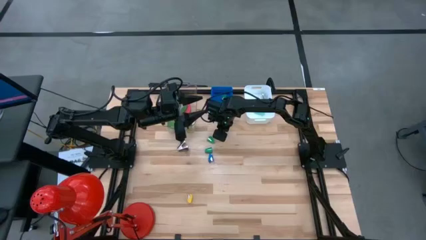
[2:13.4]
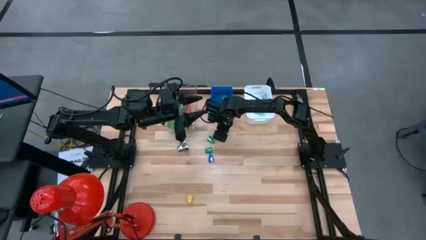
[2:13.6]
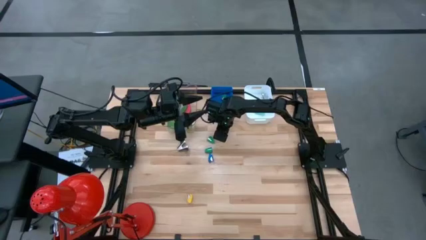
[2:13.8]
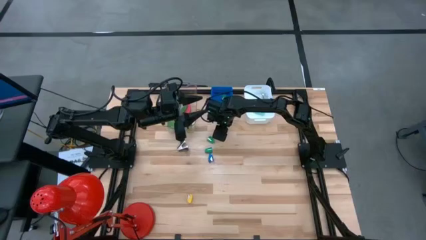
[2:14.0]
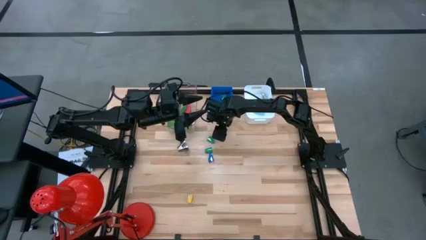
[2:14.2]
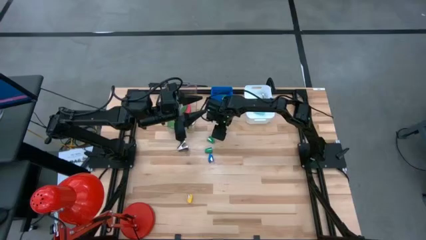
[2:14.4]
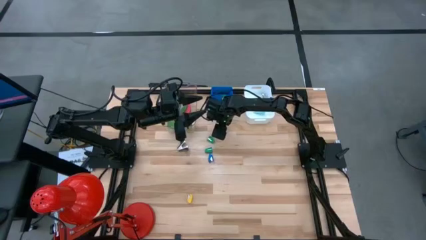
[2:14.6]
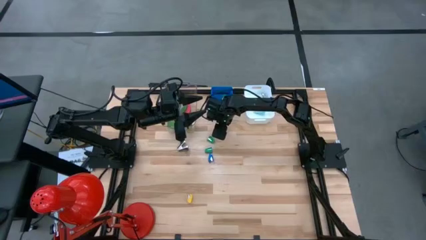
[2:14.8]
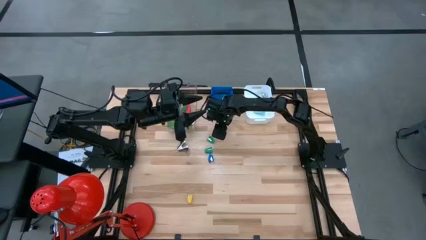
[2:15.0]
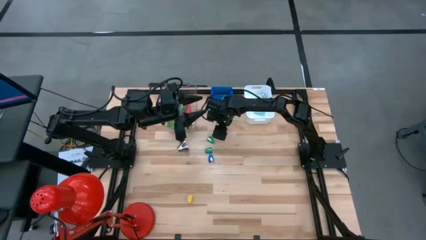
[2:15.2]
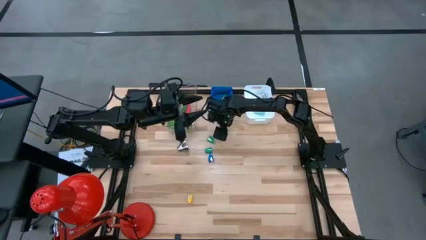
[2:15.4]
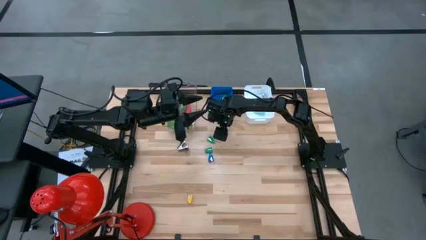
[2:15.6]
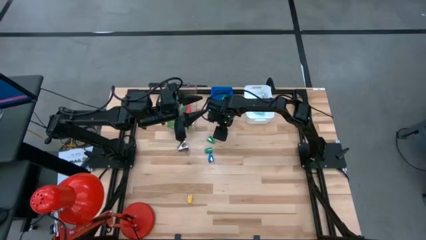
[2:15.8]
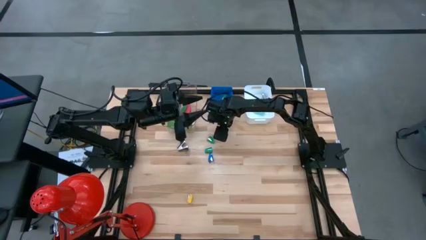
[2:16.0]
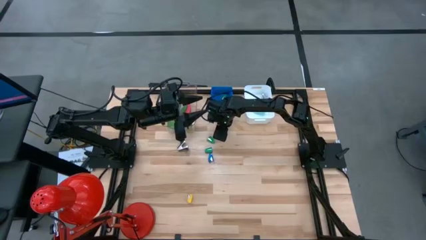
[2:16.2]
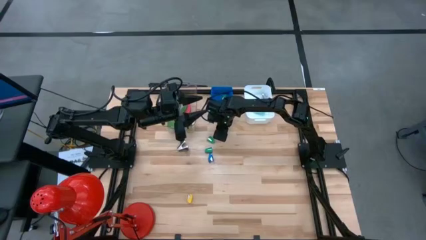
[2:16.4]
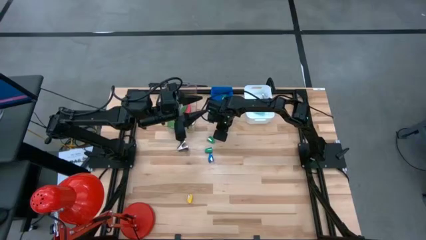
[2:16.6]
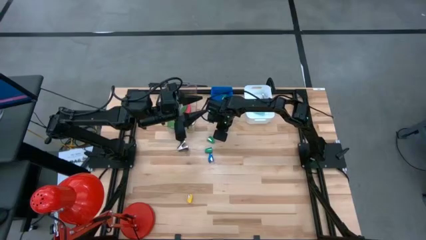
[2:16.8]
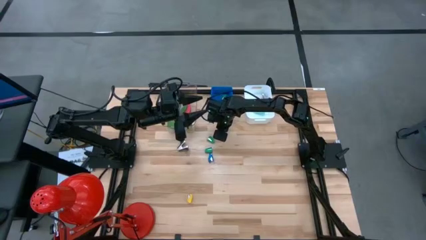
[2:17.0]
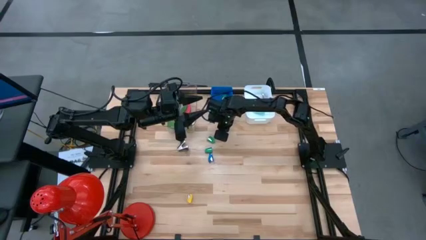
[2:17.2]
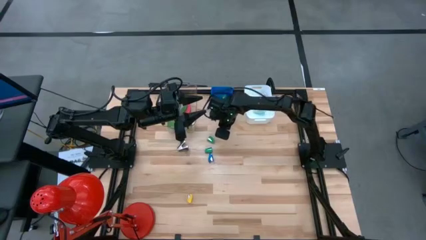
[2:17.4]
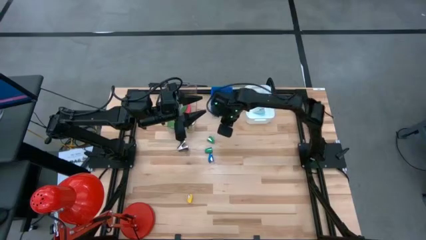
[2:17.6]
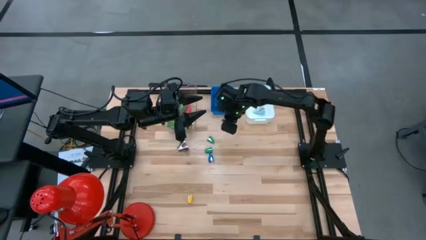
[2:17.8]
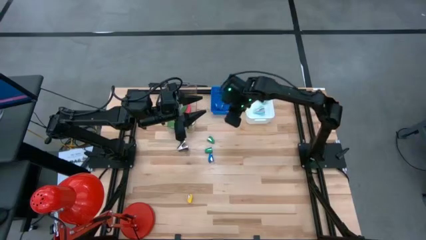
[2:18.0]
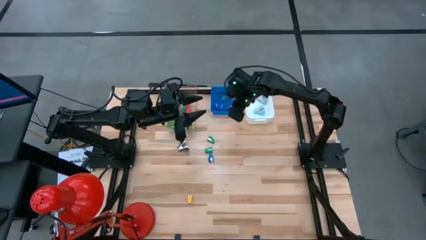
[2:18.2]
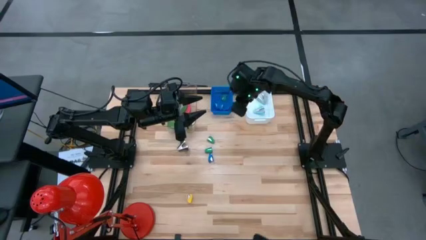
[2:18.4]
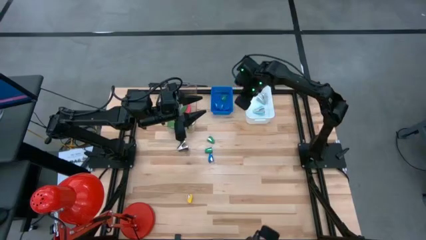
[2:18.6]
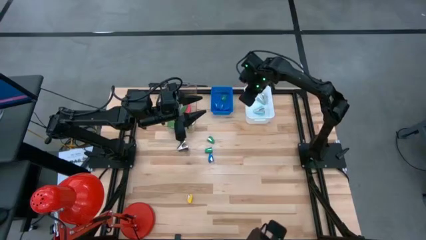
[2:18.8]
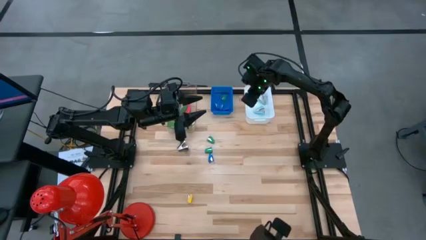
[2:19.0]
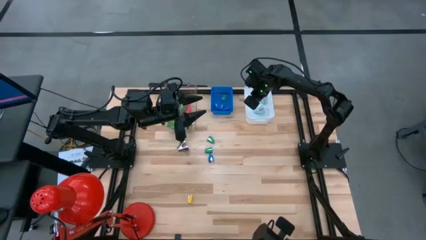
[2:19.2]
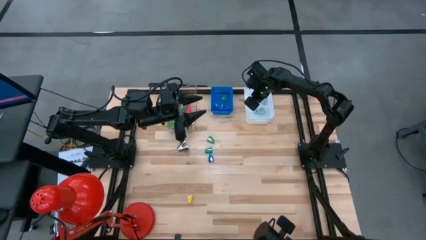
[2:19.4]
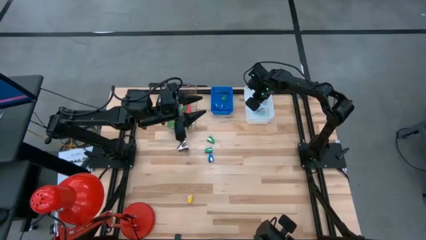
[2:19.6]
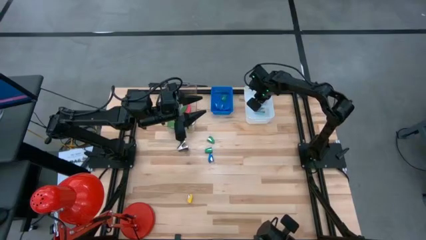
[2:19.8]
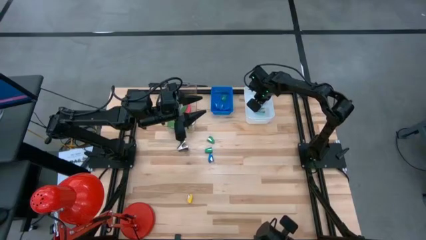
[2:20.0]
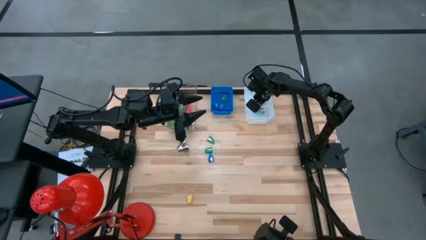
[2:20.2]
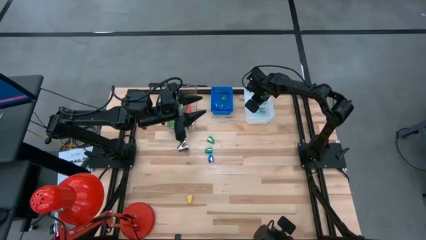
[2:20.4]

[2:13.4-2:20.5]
Task: Pick and place Stapler, Stapler remover, tape
Put the purple stapler remover into the white bin

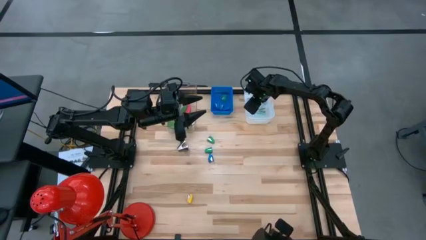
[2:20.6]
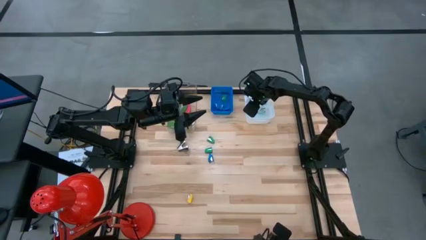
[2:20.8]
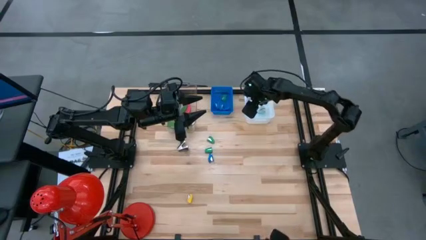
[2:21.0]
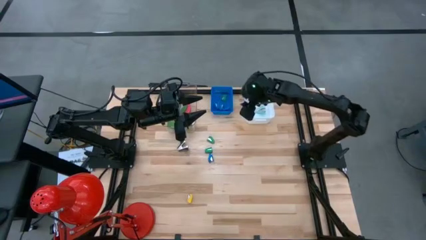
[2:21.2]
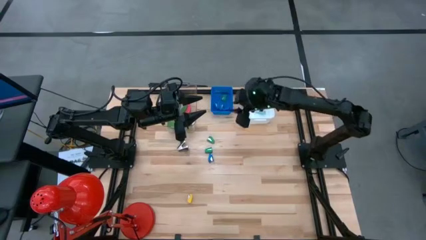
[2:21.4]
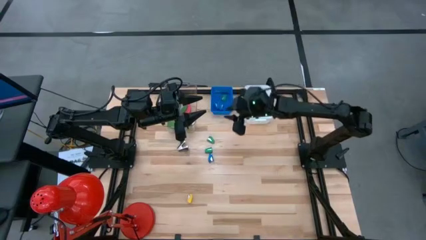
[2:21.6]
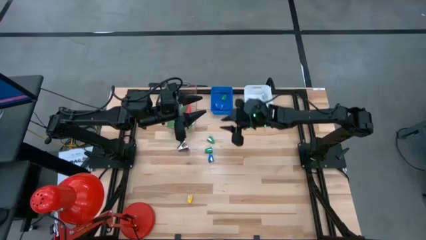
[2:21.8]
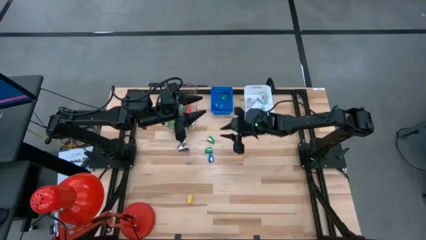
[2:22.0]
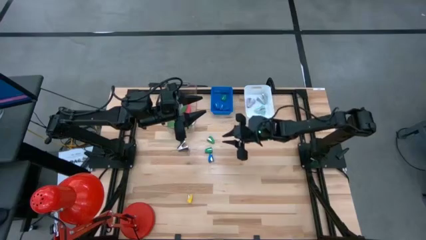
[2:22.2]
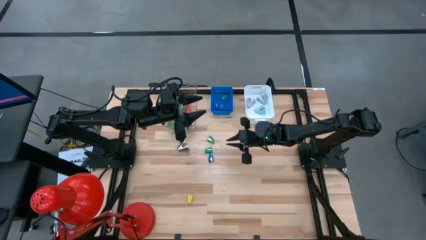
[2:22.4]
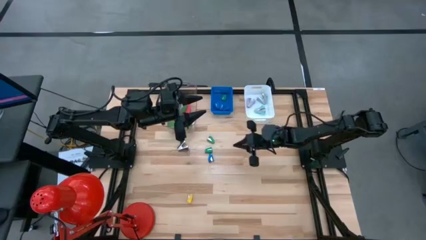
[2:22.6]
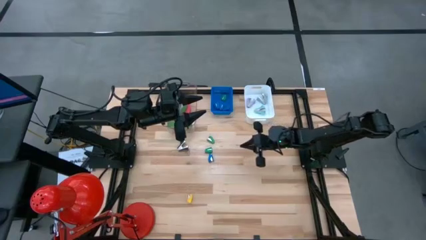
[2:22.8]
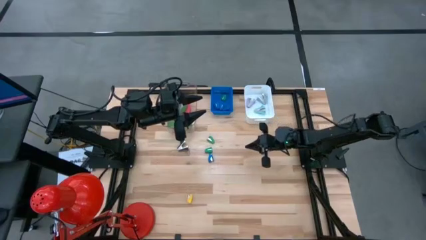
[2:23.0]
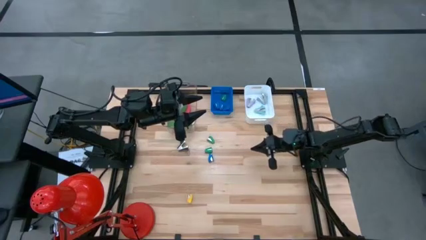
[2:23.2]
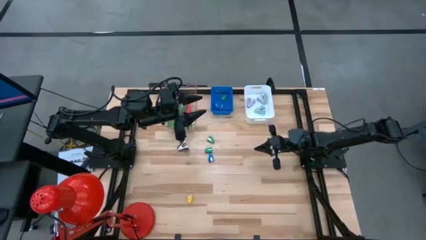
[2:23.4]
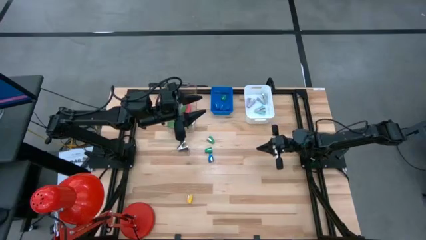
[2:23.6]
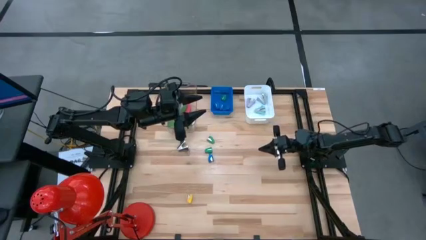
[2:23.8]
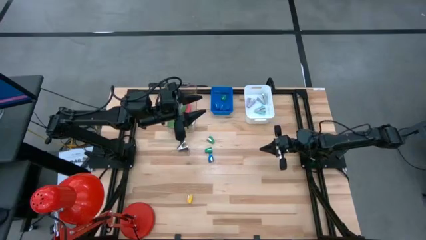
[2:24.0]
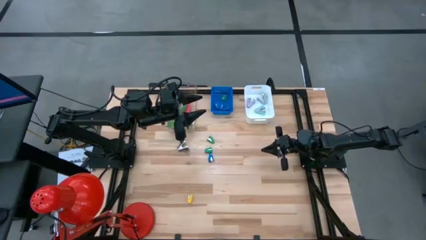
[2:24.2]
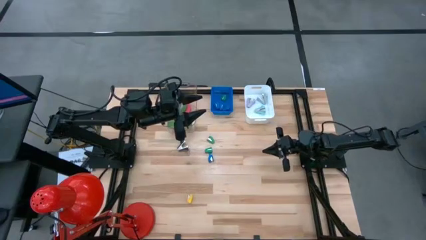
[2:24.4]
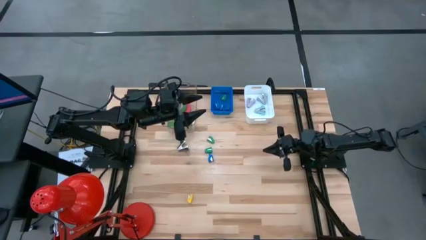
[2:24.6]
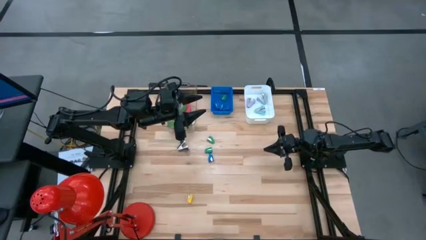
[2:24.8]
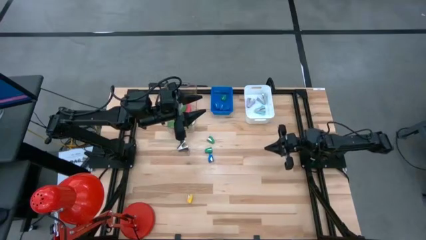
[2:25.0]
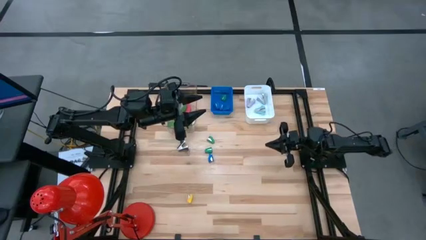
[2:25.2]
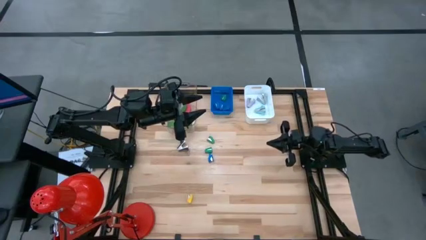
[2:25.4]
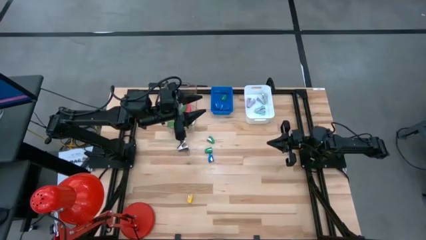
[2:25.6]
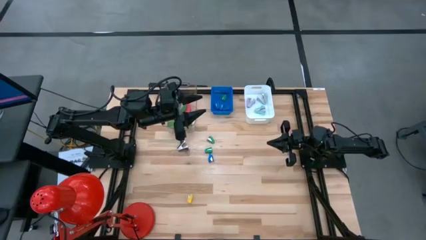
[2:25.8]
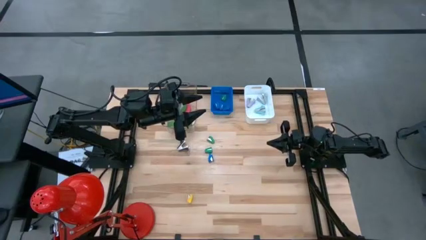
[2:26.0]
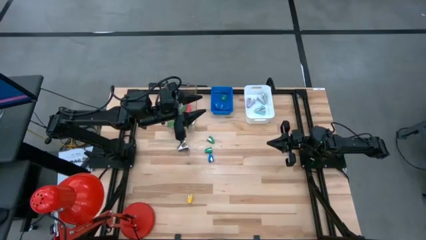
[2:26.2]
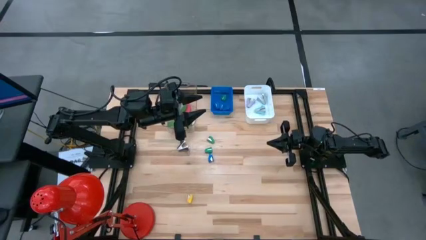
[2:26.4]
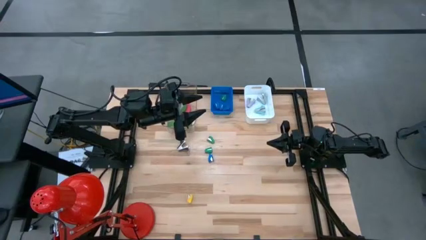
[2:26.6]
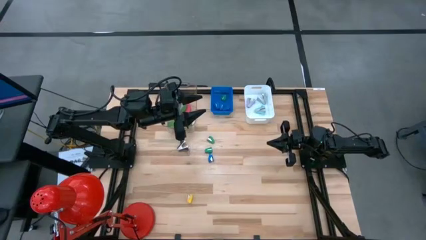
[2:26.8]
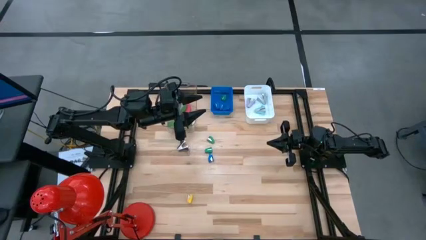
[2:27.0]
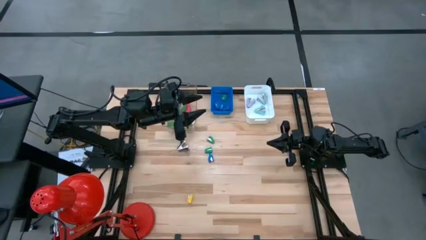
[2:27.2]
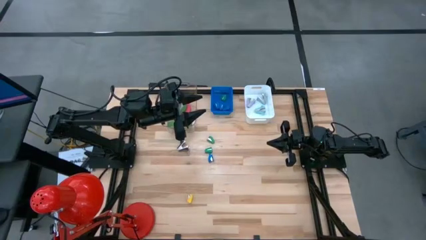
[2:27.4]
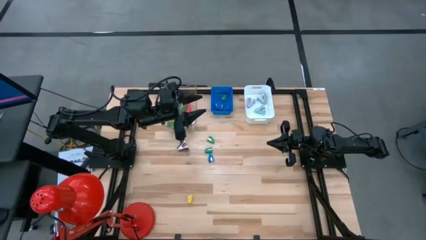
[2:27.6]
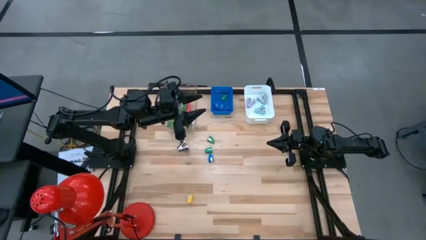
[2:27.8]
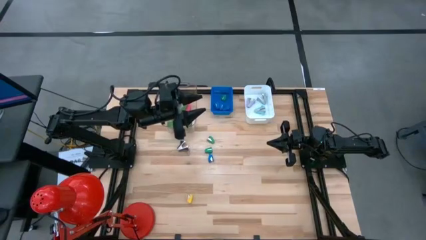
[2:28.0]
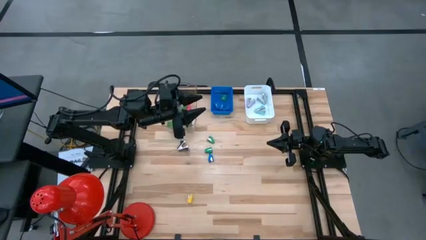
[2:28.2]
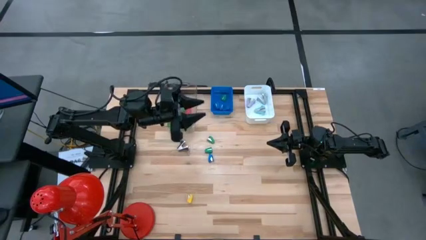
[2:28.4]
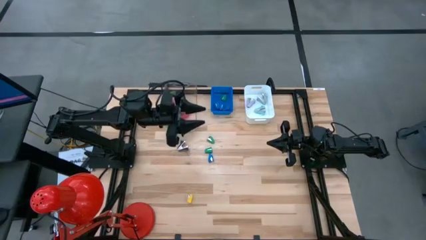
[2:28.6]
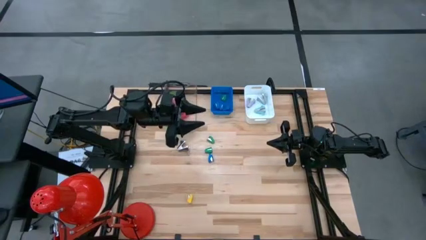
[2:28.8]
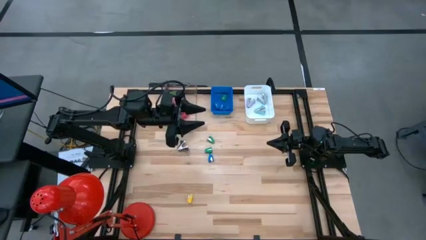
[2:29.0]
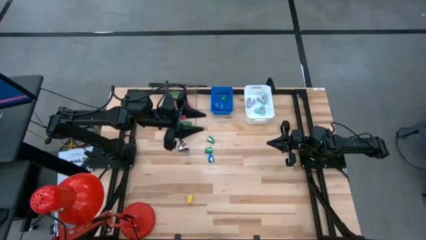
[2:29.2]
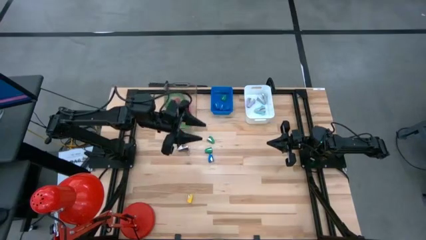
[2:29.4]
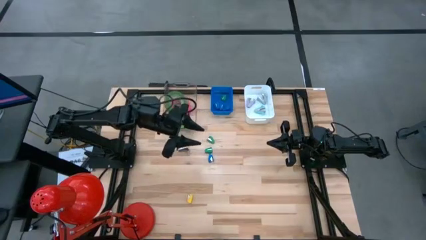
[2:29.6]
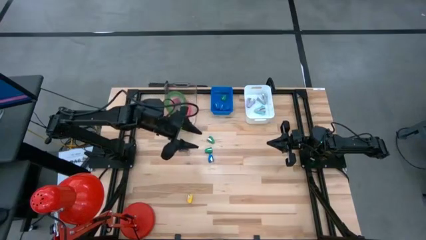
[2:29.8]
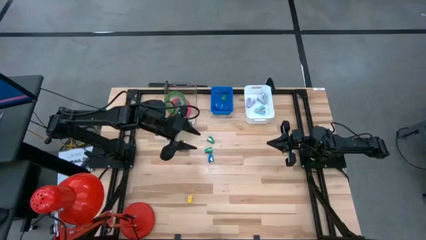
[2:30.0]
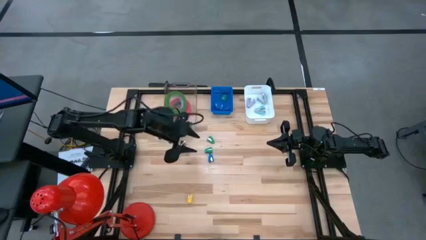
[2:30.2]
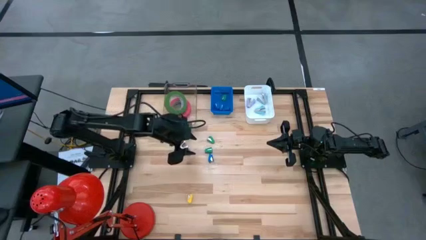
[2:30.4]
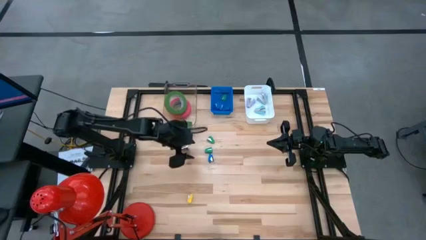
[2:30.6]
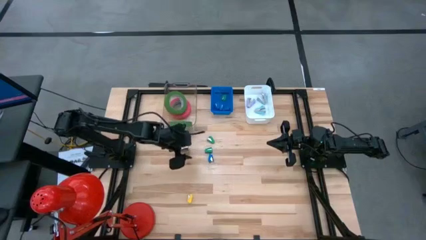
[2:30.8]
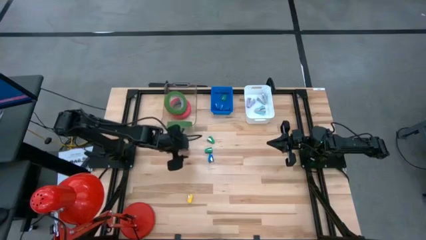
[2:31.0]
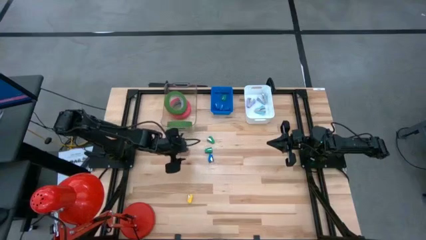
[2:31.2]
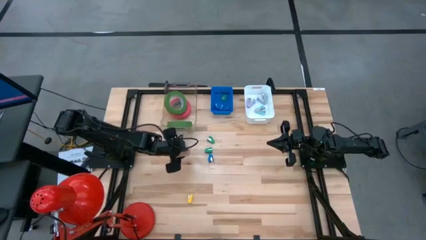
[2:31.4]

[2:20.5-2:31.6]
Put the black stapler remover into the white bin
